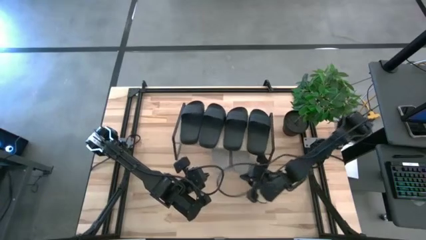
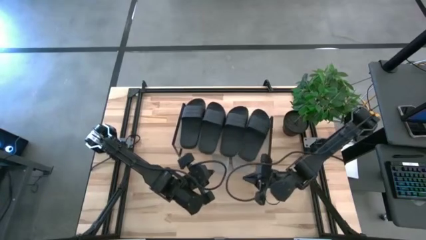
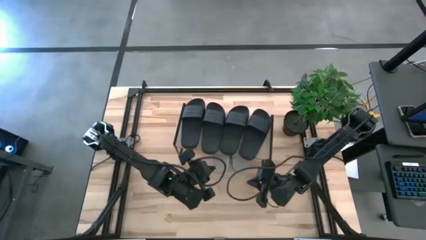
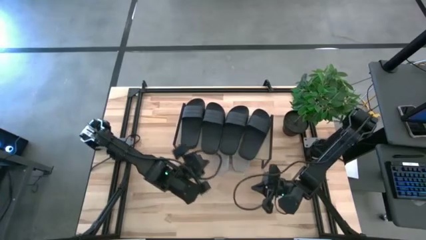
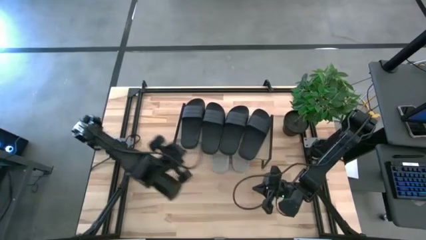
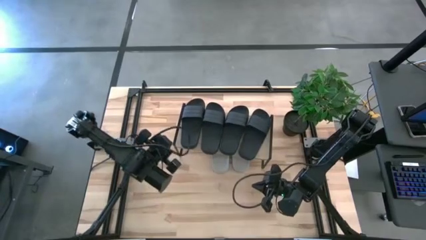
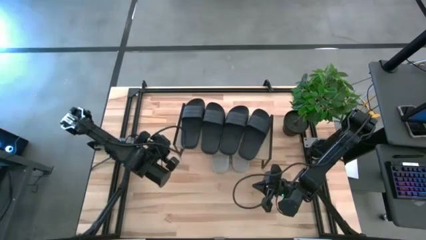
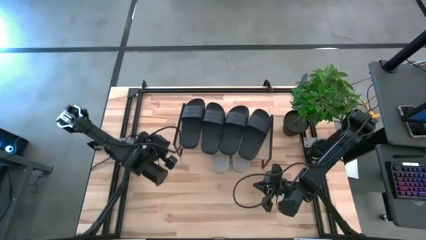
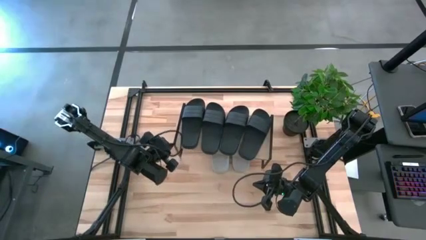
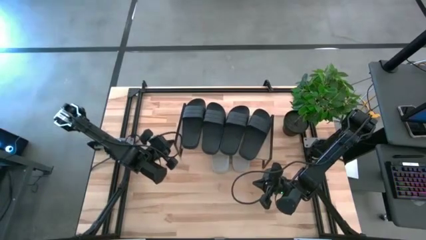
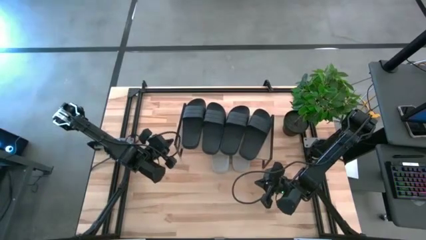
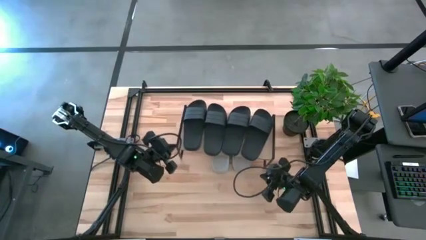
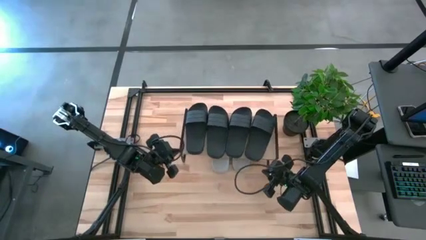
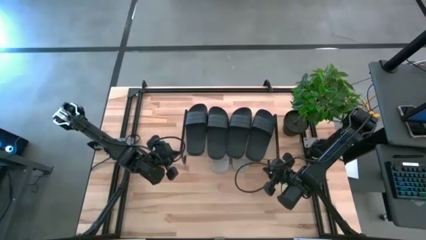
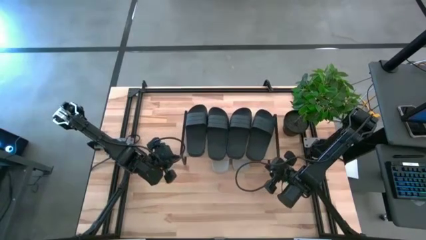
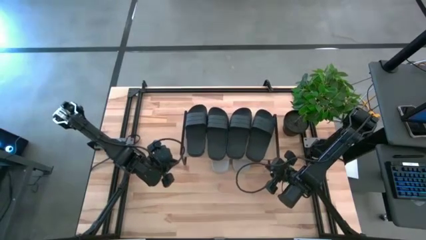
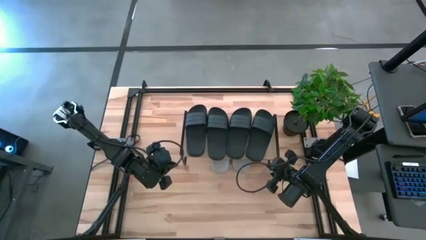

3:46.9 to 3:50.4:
Task: Pick and place slides into the shelf
Adjust the shelf

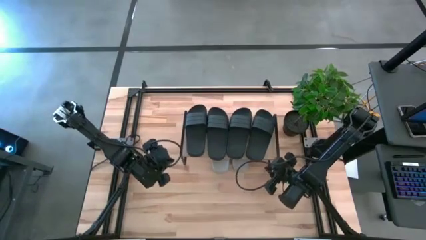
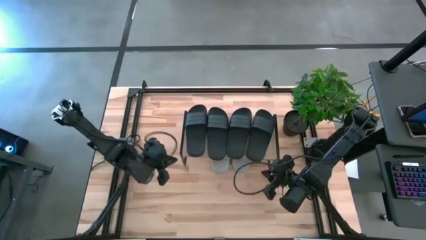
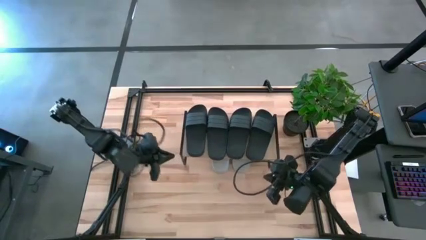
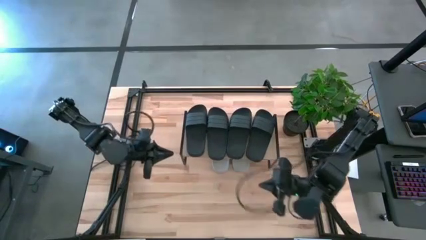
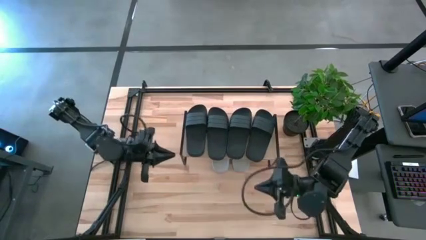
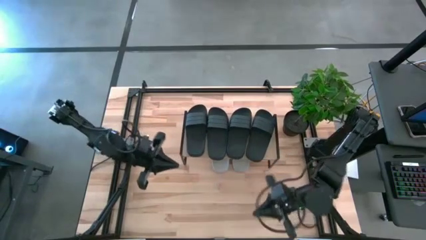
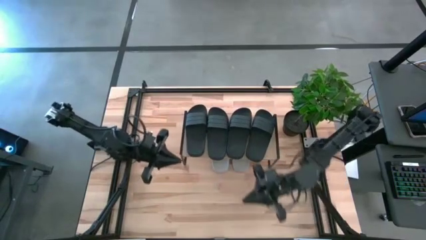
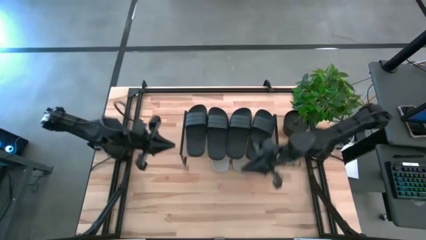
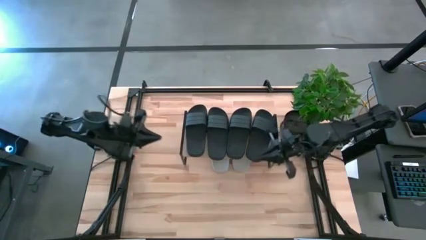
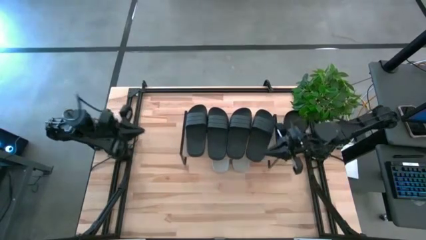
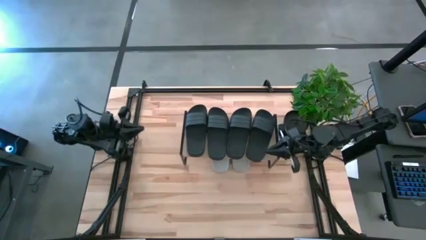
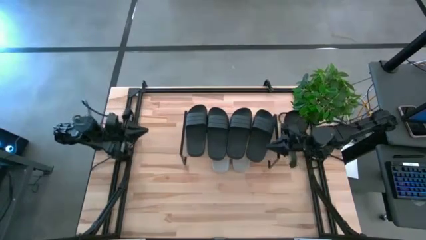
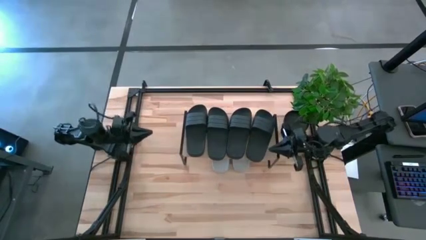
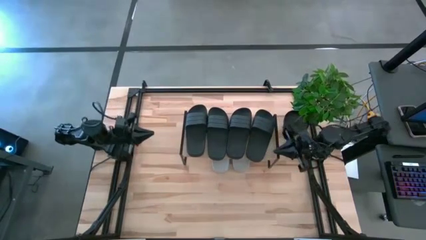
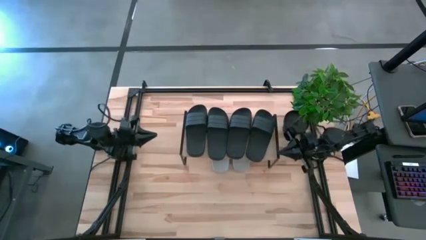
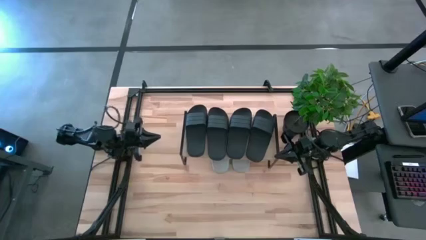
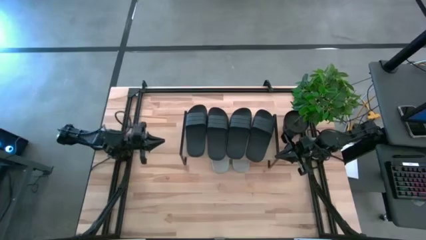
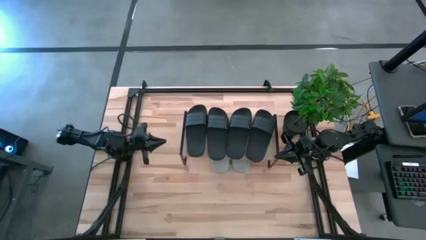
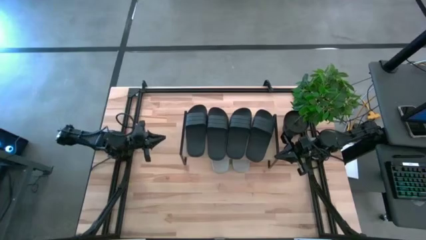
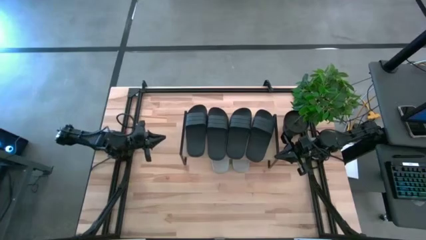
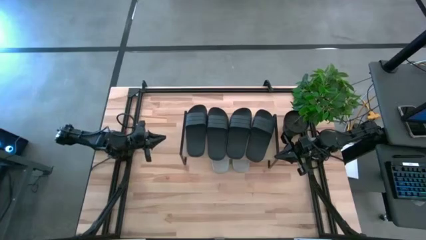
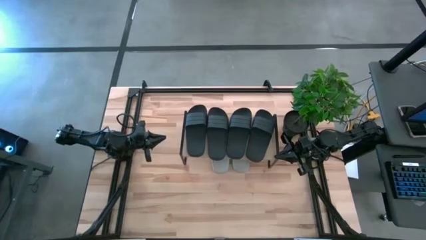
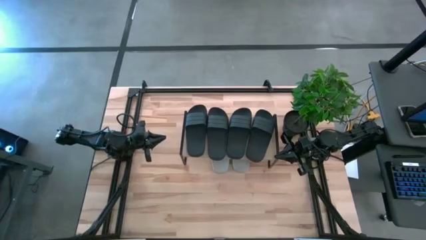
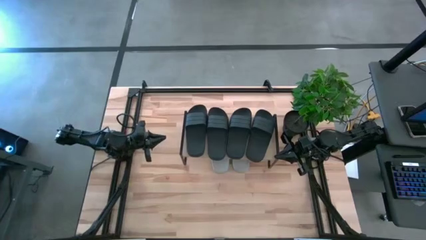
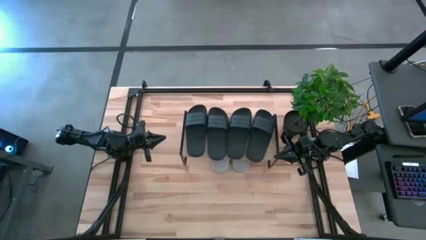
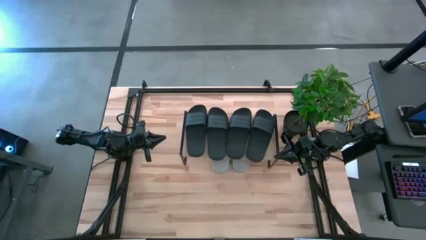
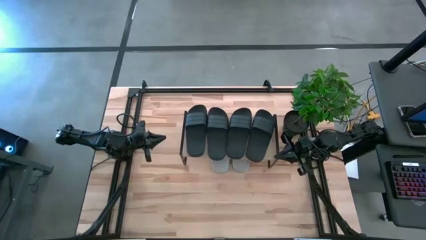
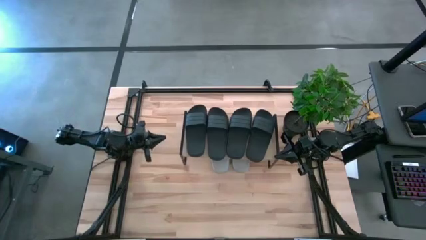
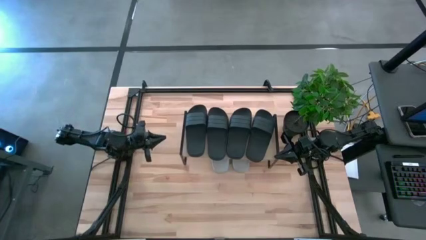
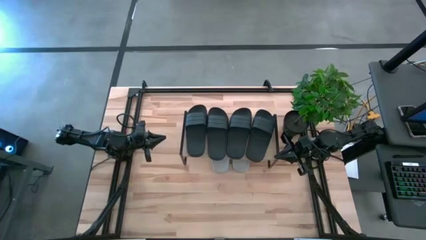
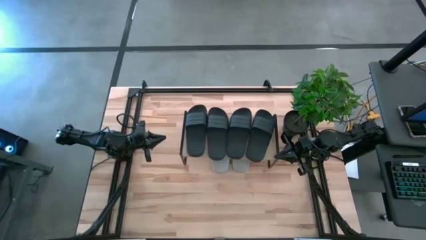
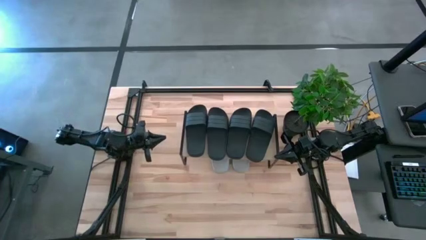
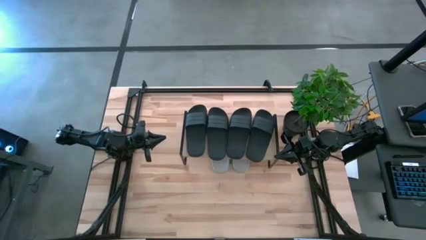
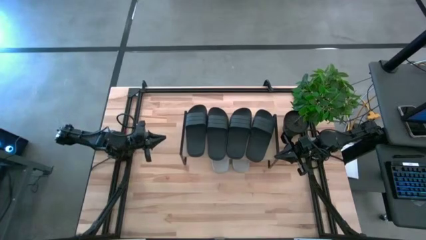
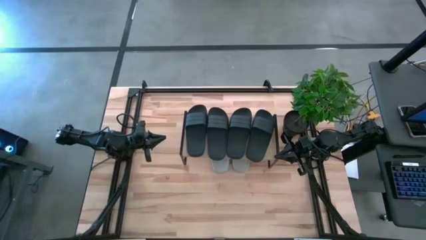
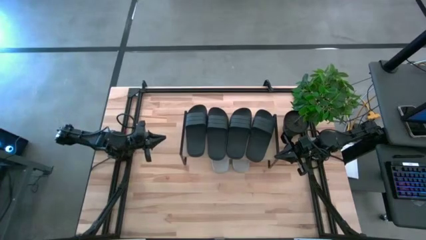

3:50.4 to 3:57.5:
Return to Home Position

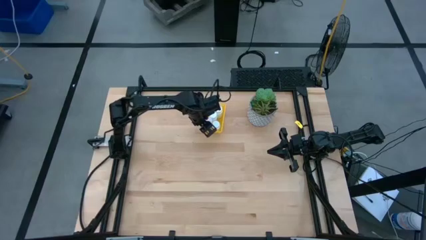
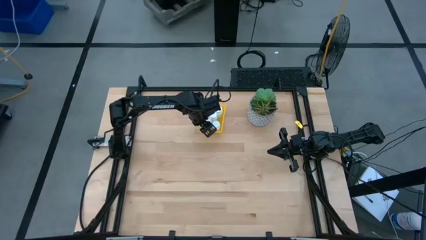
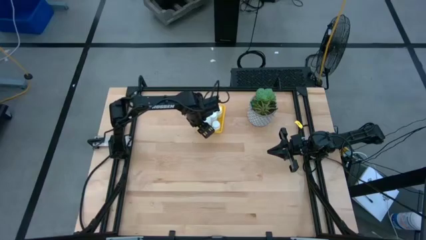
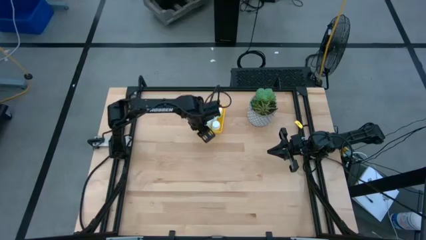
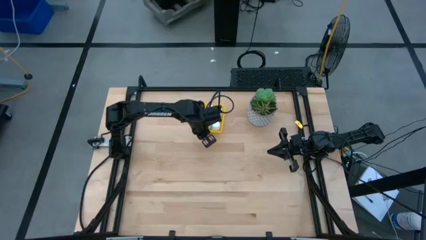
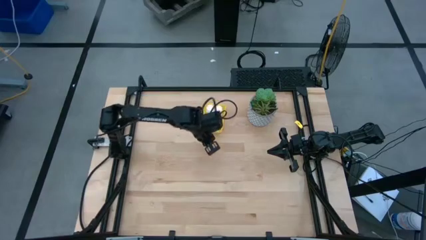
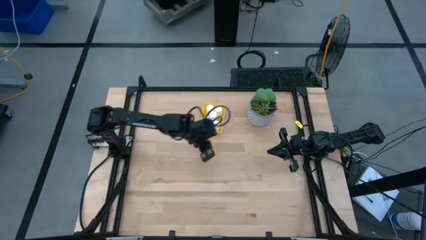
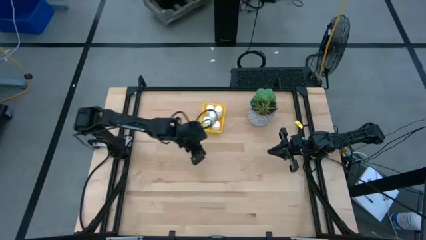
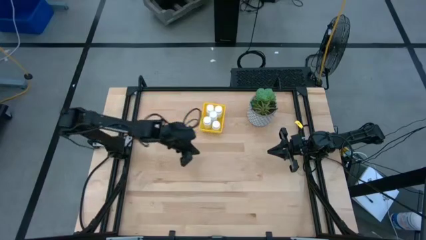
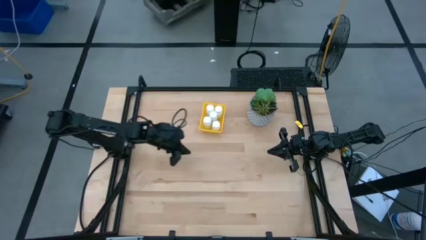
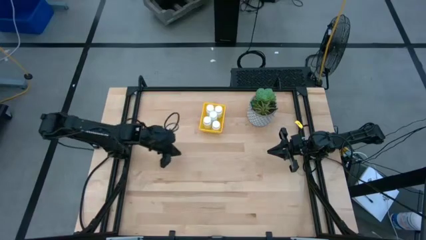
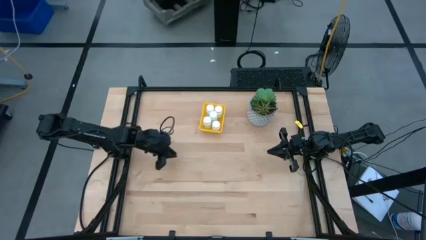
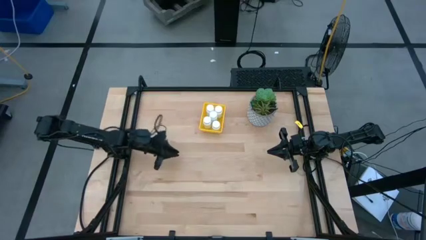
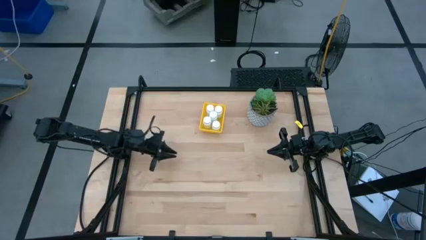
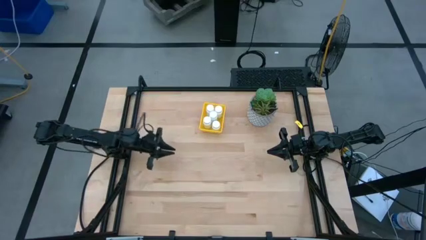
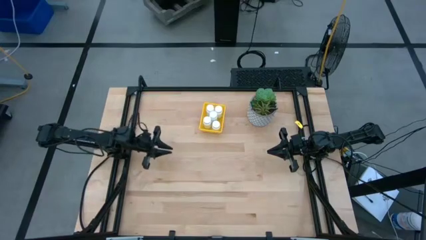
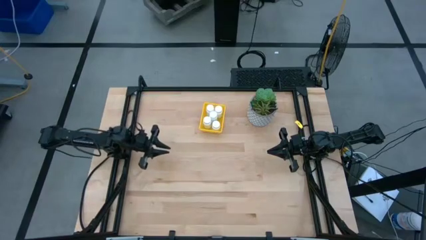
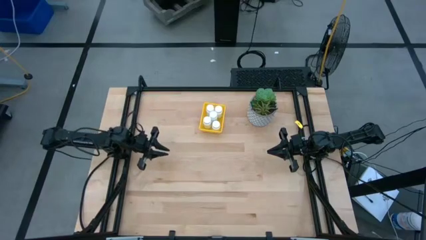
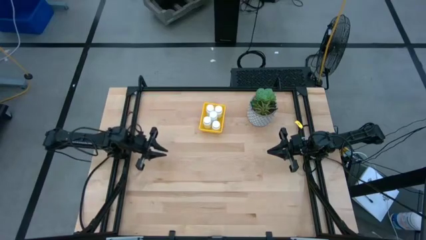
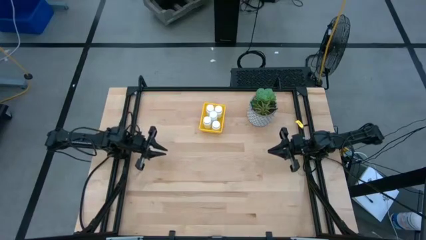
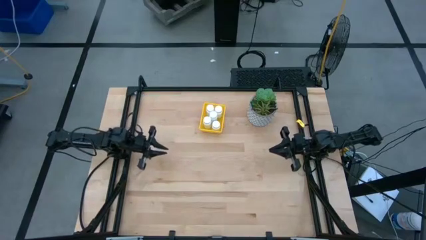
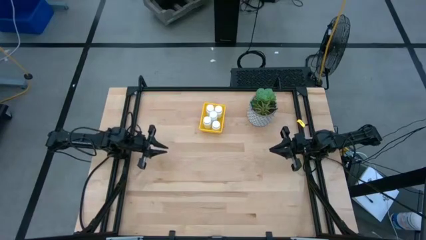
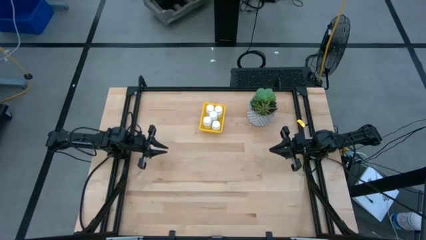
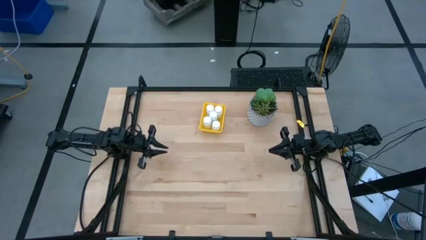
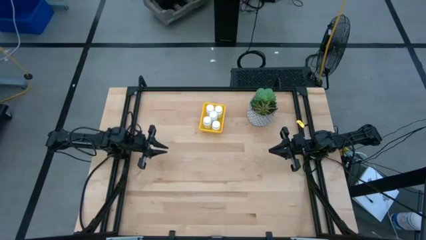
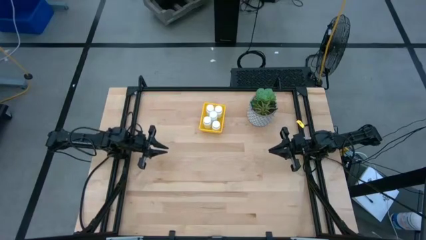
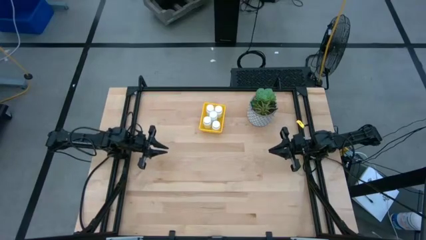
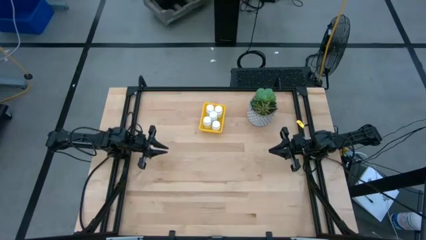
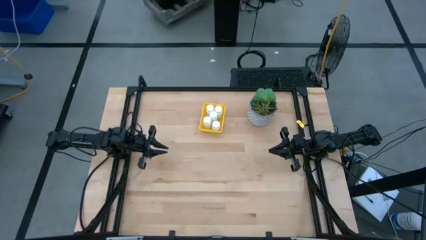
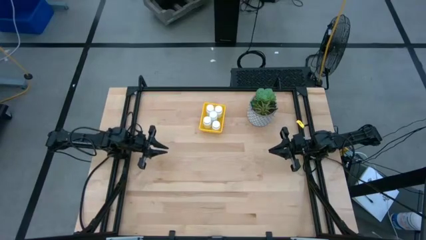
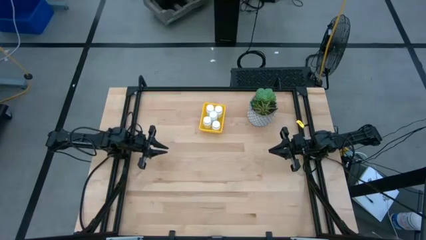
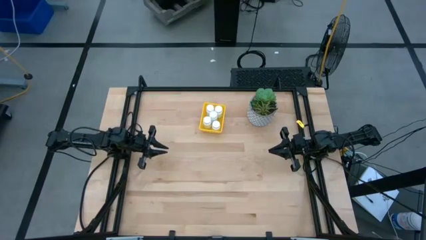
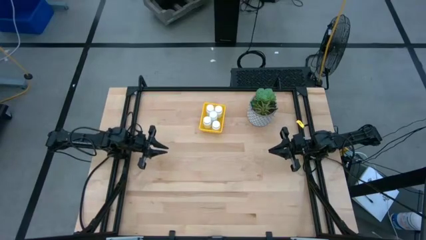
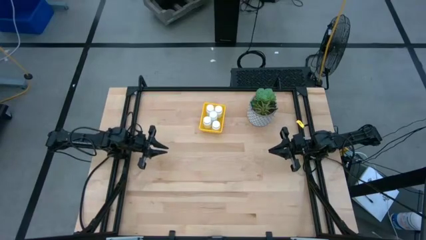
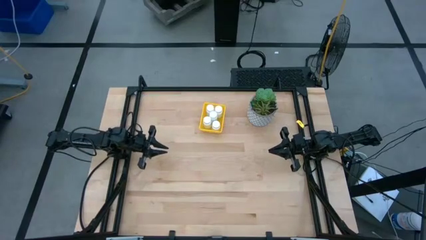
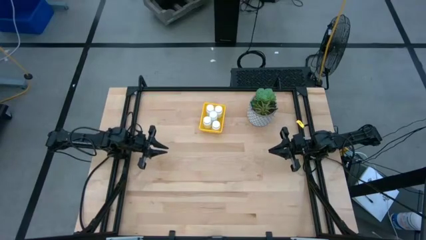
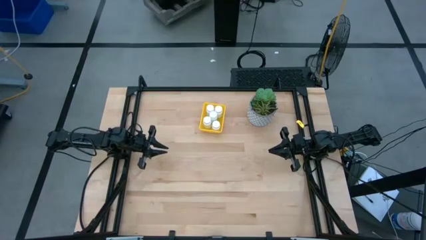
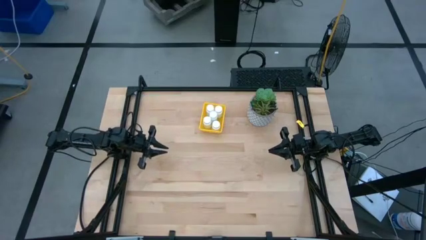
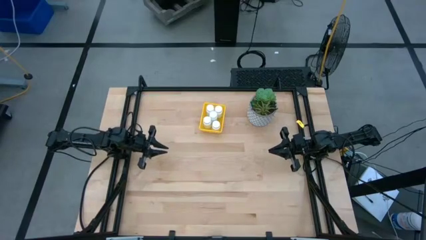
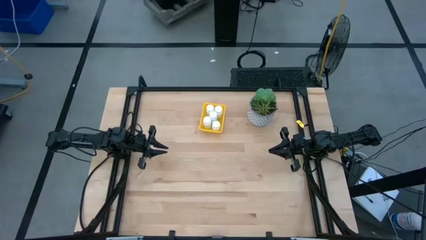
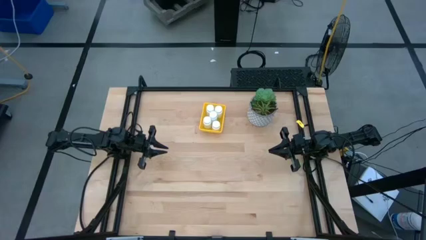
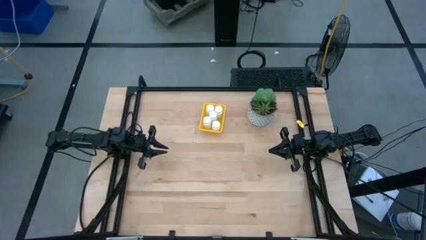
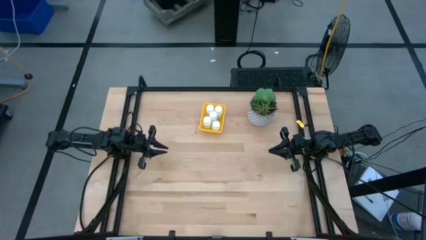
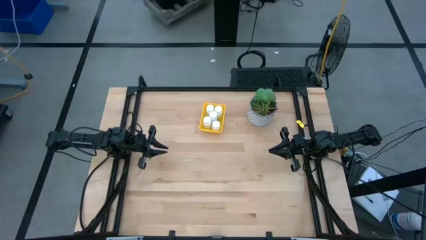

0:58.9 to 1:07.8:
Task: Pick and place pill bottles into a basket
Return to Home Position
